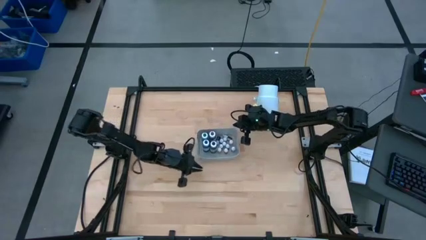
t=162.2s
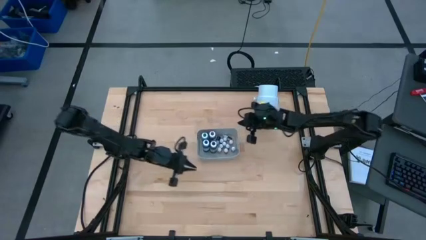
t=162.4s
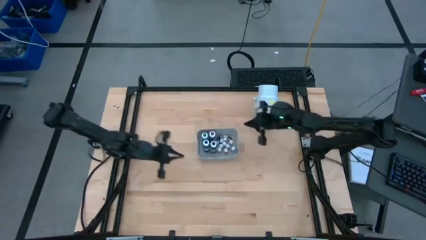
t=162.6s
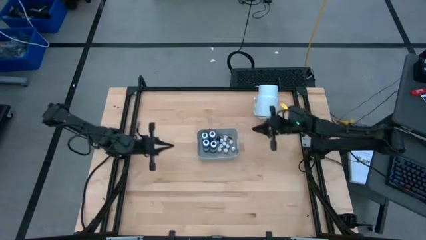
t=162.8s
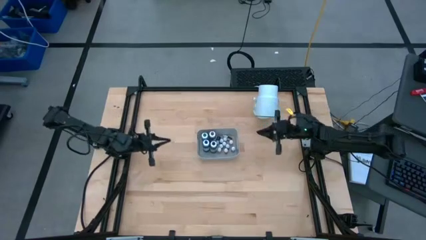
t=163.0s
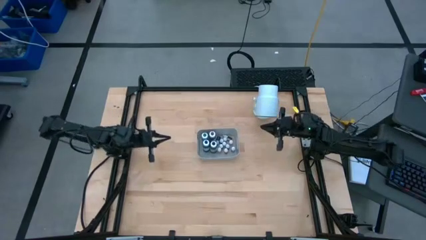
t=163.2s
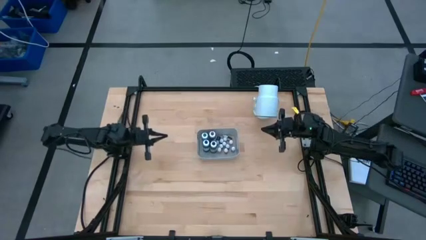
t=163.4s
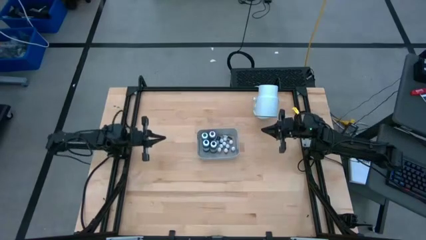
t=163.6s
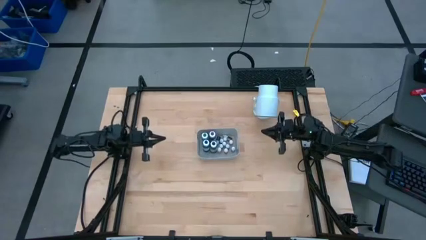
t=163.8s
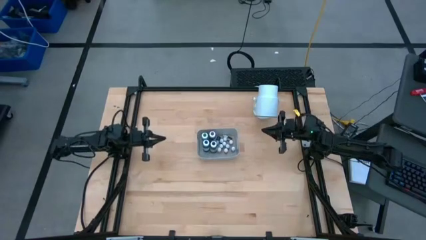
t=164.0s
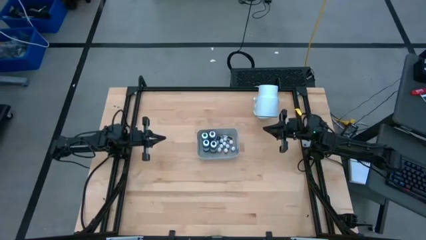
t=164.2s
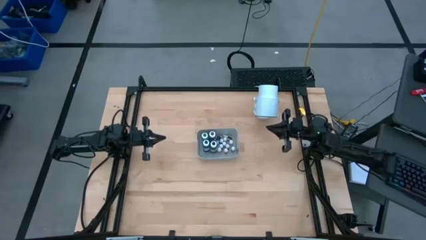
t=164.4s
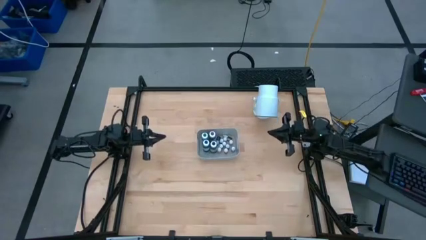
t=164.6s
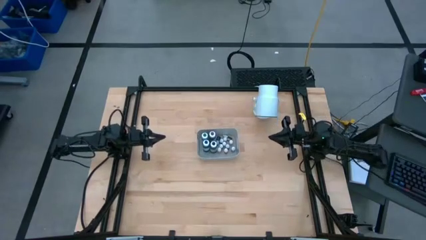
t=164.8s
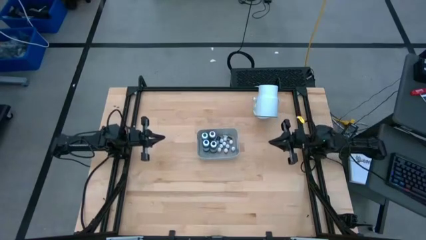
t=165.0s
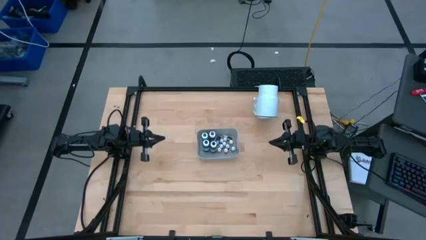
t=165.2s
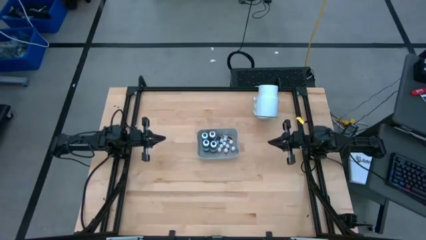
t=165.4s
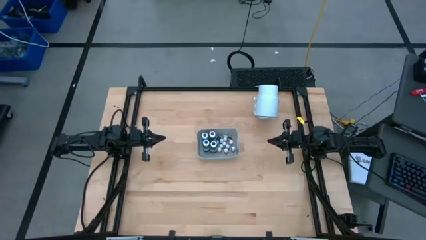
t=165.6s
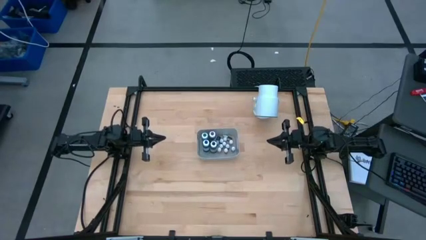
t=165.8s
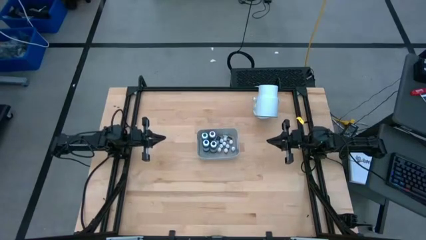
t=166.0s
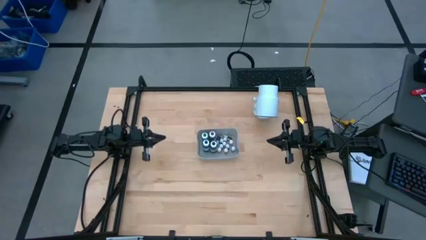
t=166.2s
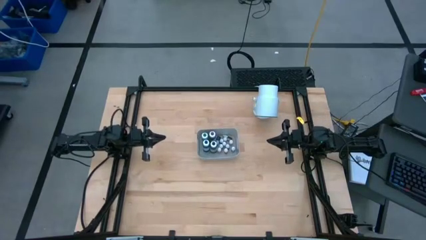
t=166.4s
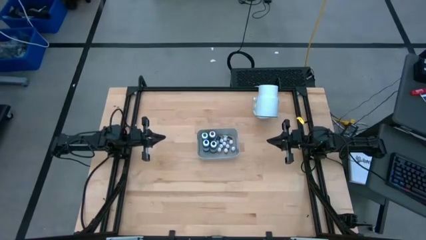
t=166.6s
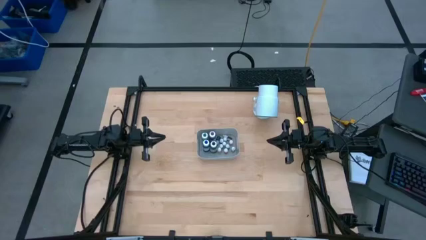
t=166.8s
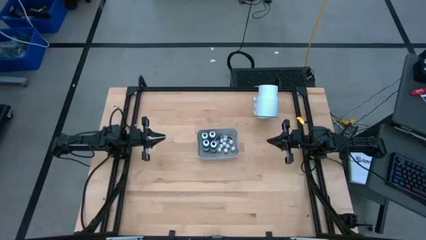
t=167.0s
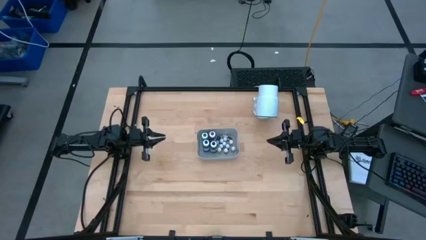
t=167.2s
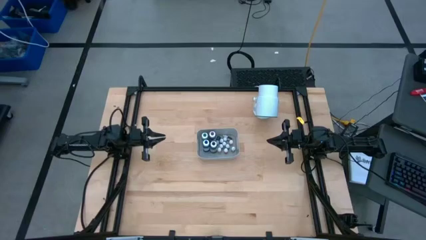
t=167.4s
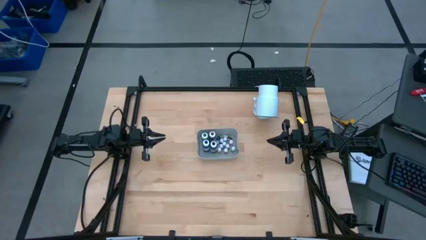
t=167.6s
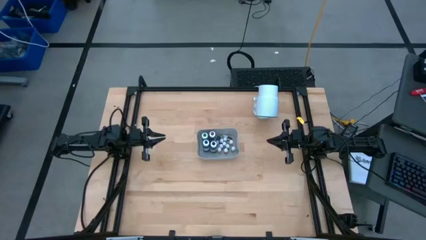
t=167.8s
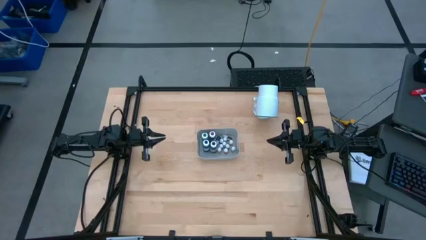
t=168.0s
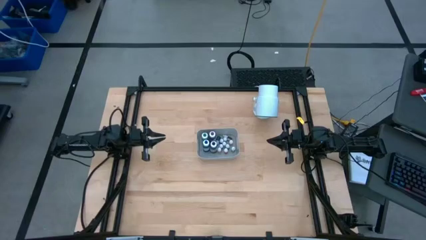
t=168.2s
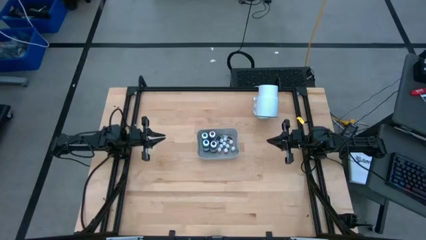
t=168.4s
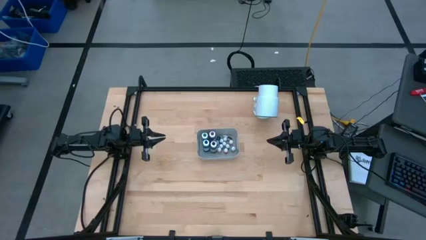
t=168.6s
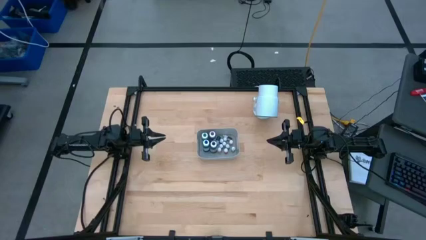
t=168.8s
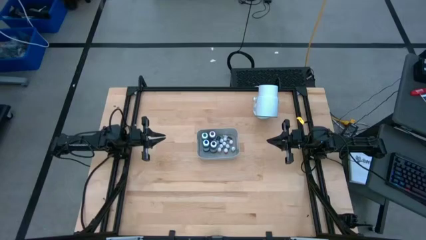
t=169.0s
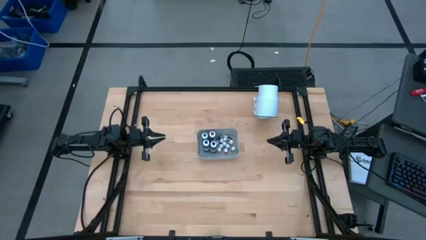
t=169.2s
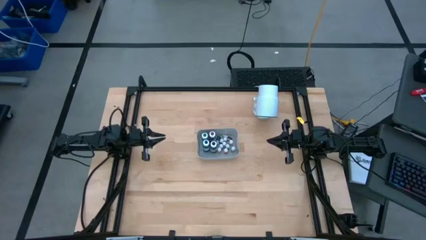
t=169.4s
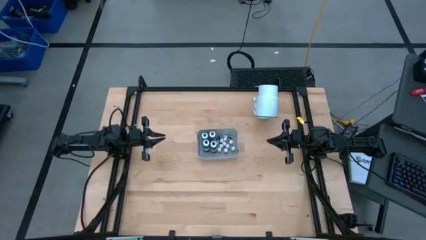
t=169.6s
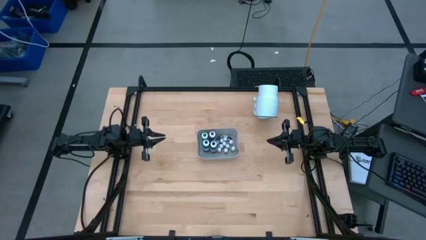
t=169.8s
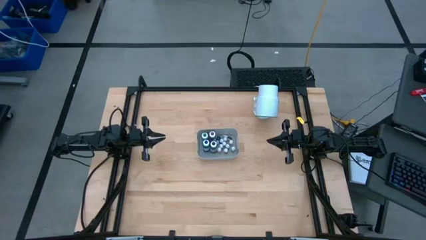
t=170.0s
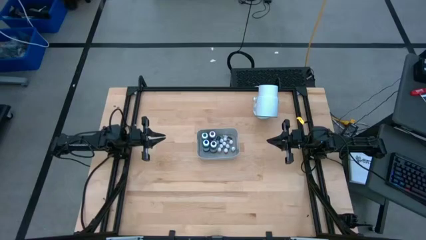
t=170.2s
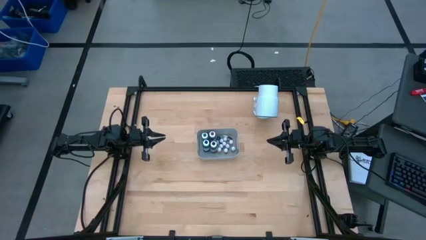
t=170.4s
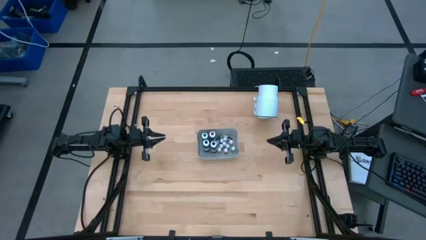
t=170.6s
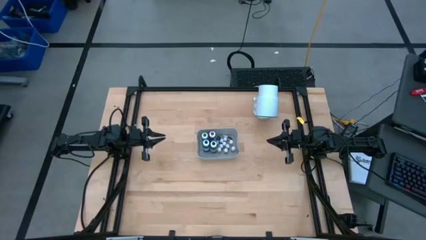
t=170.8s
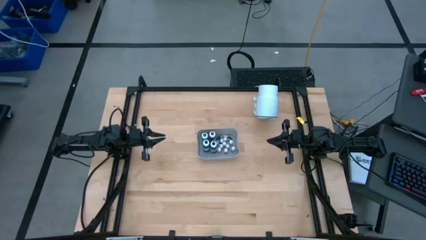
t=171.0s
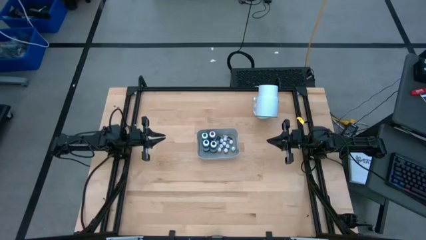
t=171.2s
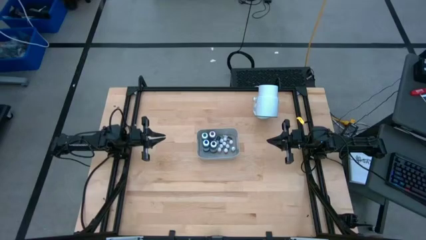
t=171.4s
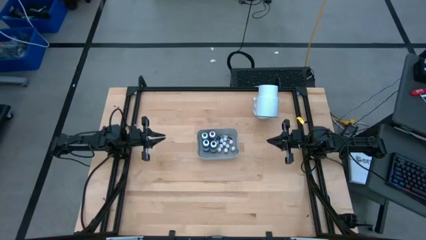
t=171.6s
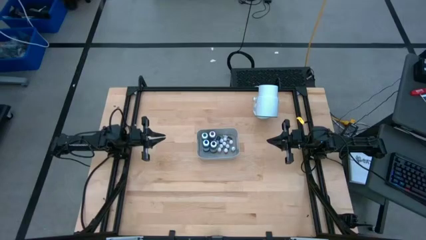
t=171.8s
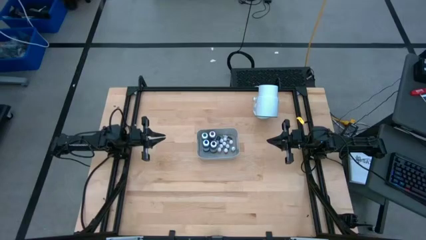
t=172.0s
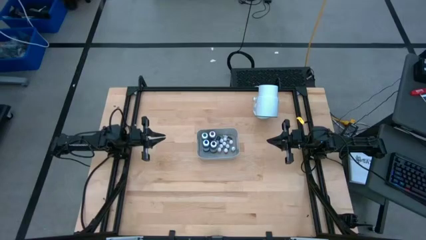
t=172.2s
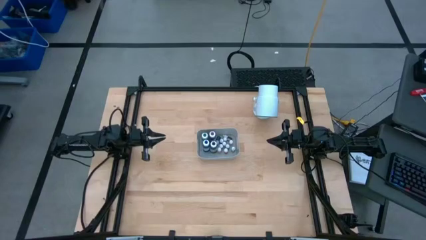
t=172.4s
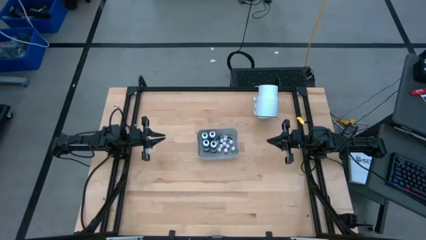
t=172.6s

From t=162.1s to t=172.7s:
Task: Pick & Place food coloring
Return to Home Position

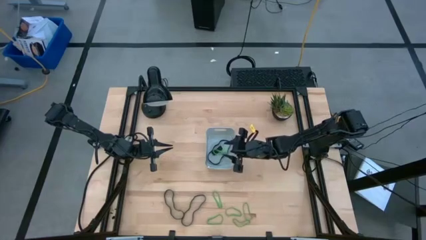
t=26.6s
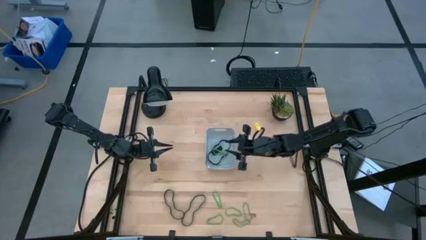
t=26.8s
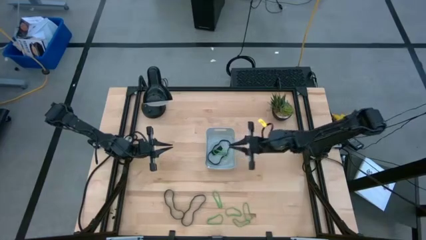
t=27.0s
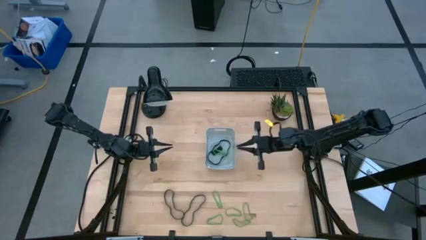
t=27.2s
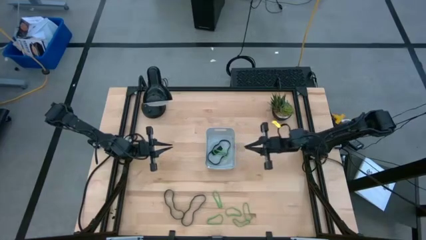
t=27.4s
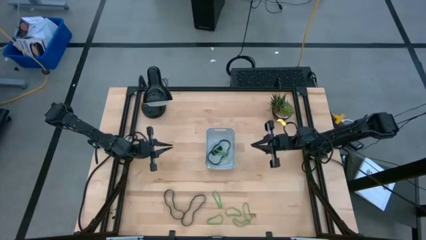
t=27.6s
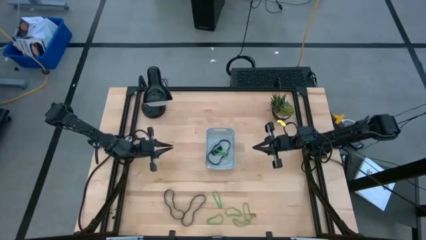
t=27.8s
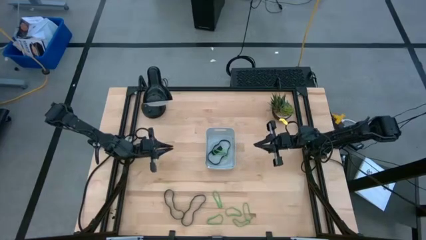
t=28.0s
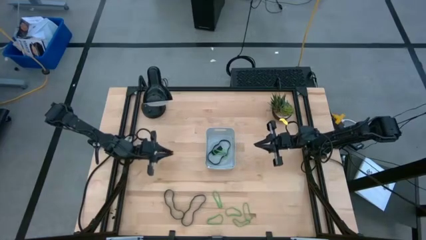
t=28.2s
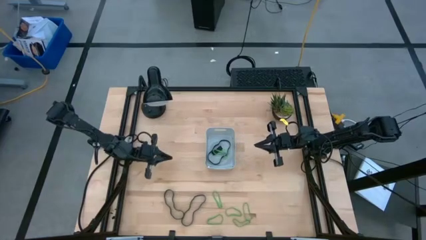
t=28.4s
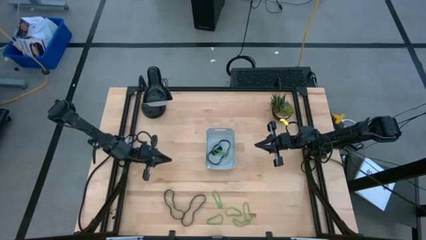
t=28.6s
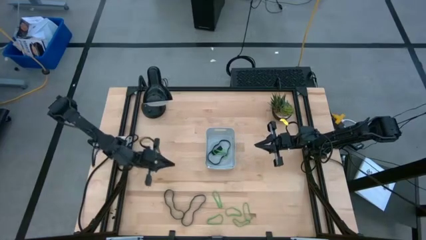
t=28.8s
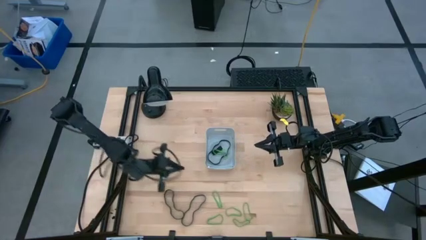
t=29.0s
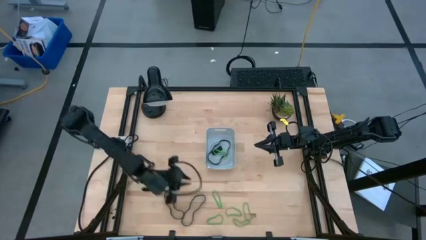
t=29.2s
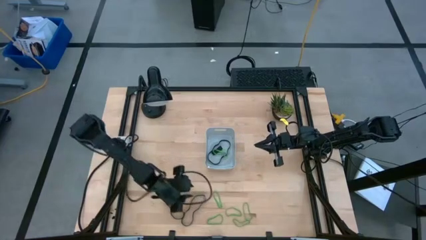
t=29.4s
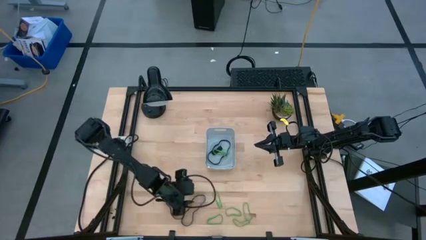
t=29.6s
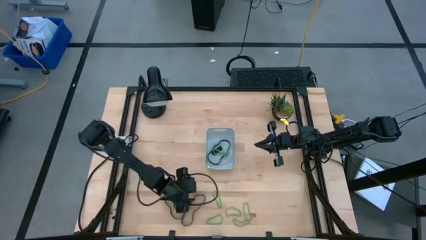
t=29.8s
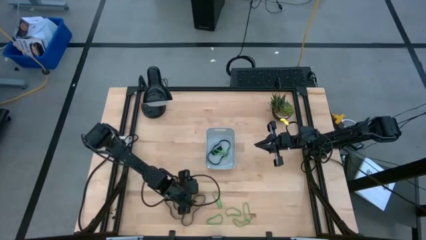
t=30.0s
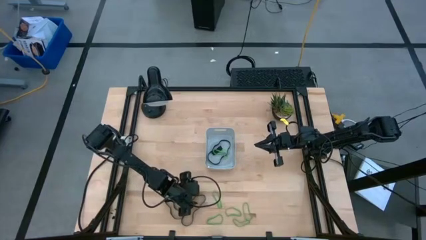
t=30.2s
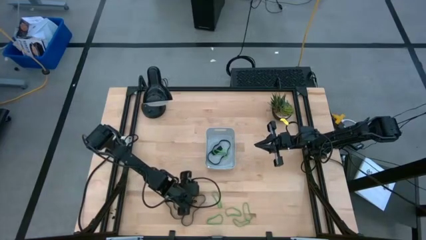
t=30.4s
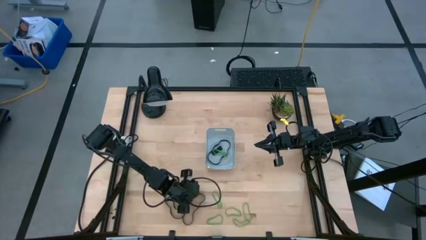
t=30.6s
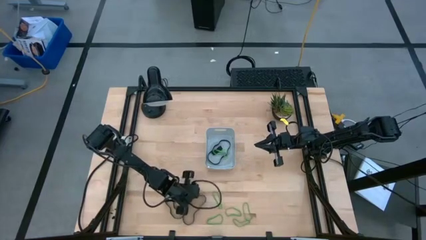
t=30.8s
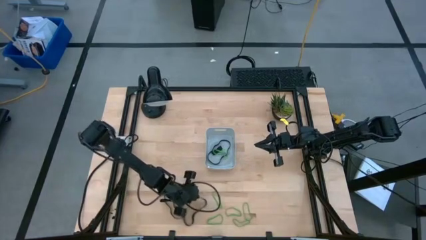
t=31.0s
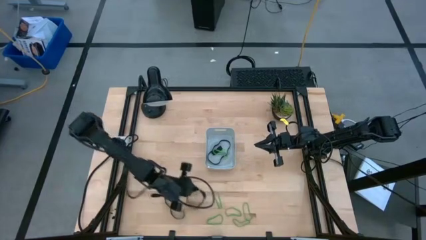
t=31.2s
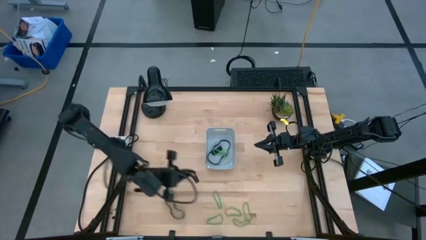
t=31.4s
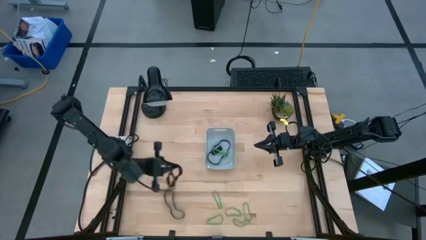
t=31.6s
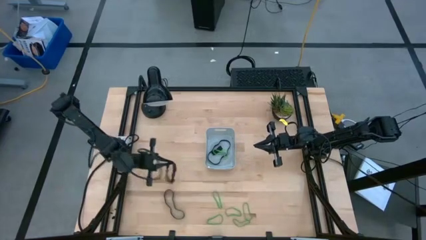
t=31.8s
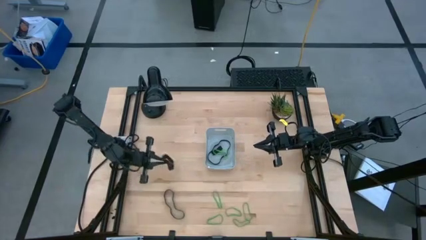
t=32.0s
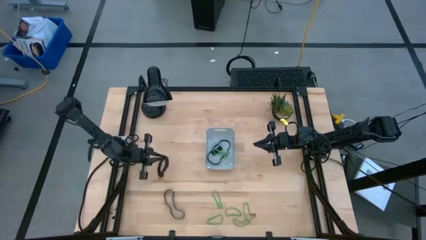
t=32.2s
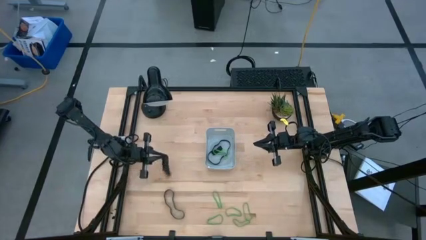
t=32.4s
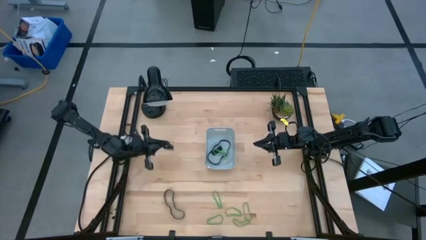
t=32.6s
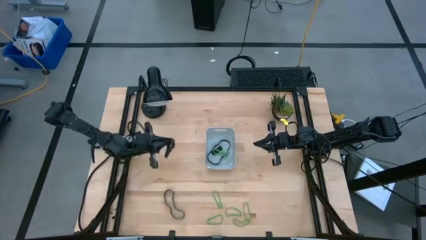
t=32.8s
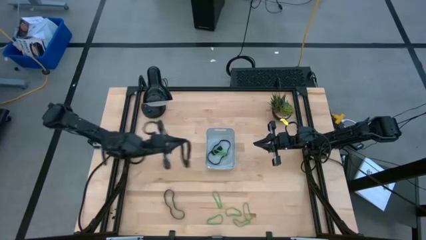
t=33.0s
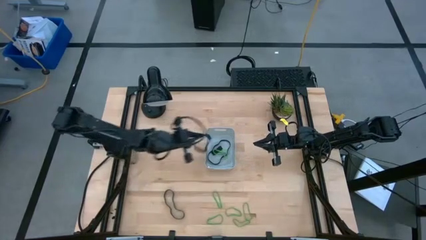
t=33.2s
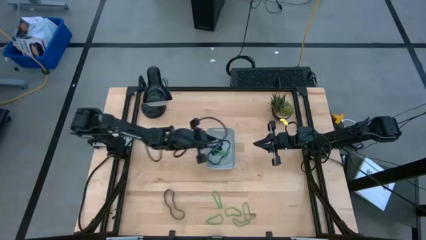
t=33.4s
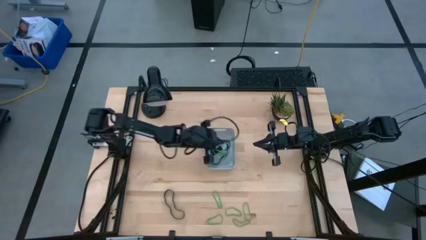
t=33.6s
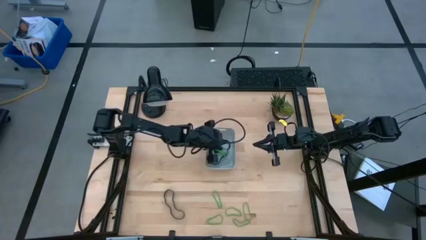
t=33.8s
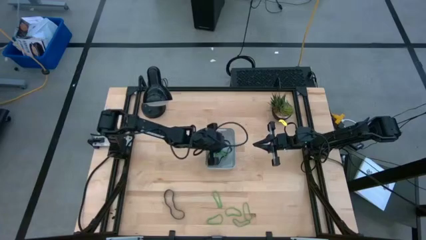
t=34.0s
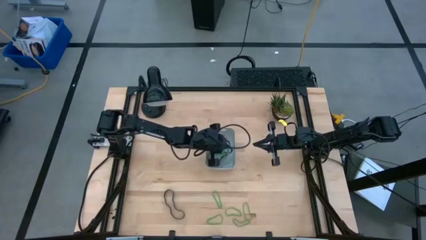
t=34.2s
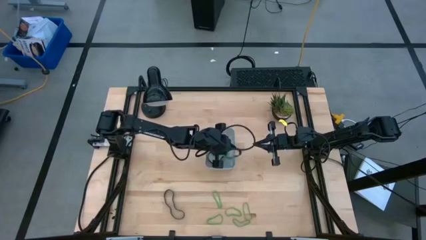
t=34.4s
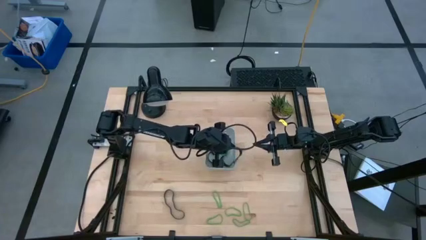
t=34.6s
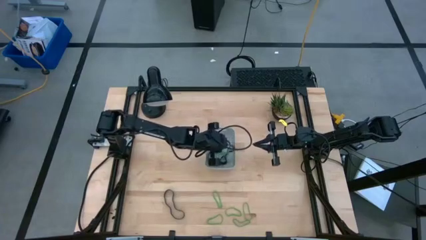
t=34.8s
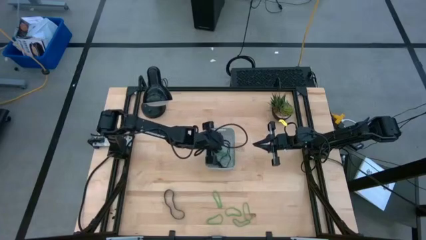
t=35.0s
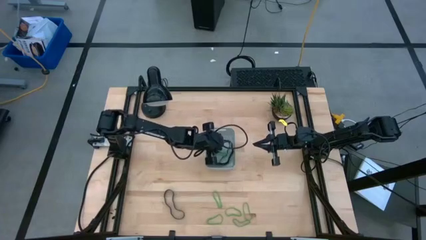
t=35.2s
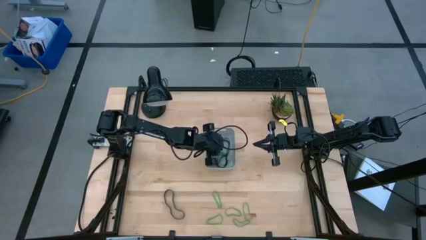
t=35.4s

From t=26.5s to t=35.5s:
Task: Pick and place rubber bands into bin
Put the black rubber band into the gray bin
